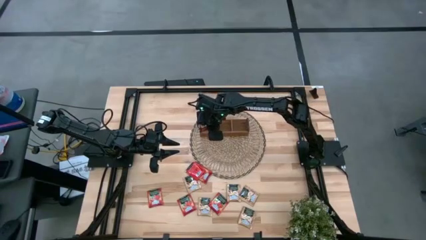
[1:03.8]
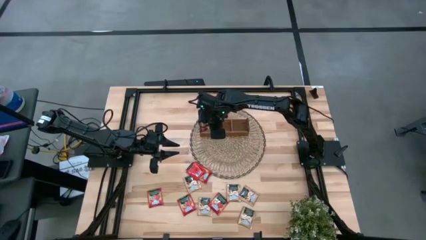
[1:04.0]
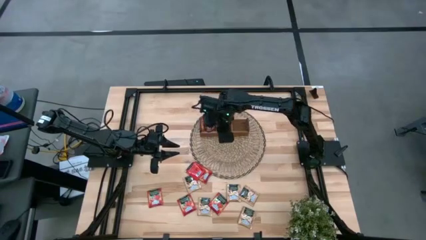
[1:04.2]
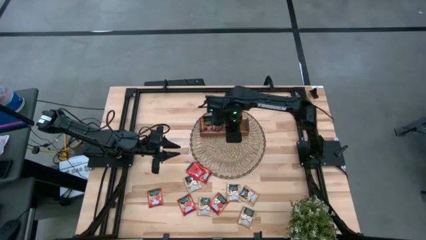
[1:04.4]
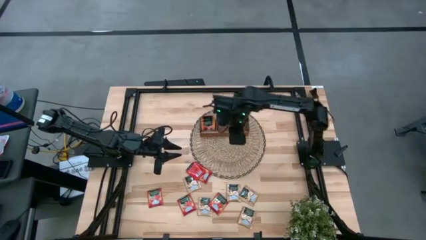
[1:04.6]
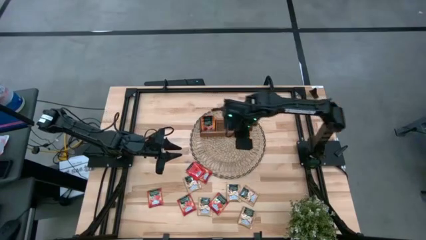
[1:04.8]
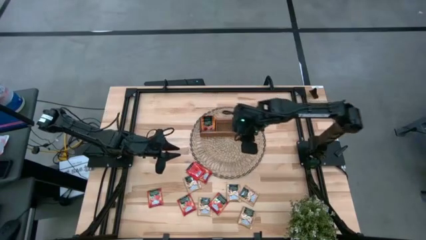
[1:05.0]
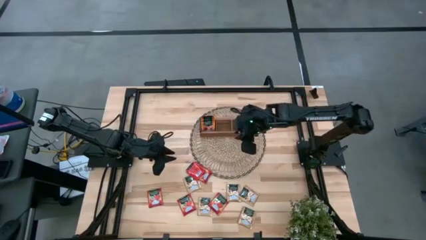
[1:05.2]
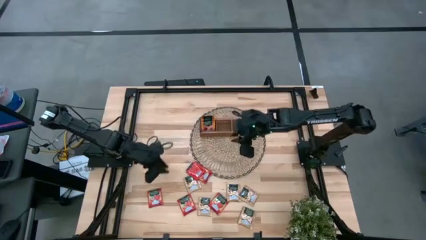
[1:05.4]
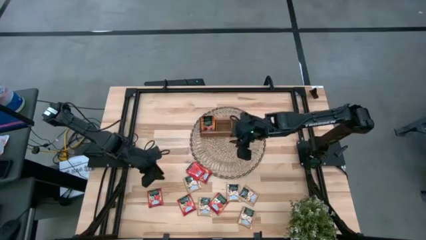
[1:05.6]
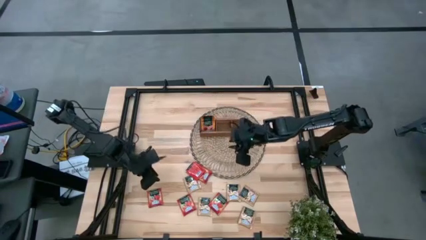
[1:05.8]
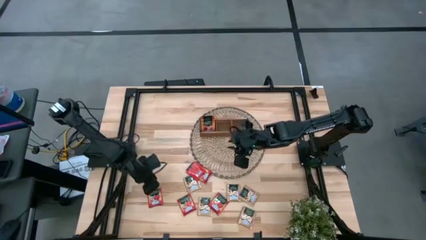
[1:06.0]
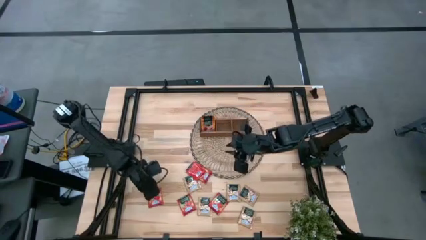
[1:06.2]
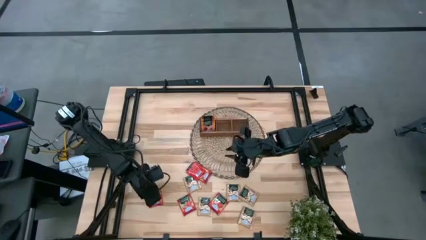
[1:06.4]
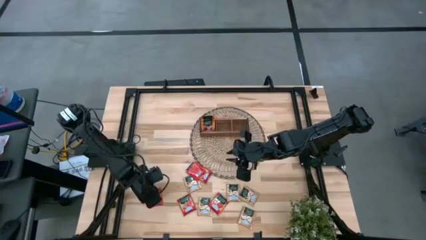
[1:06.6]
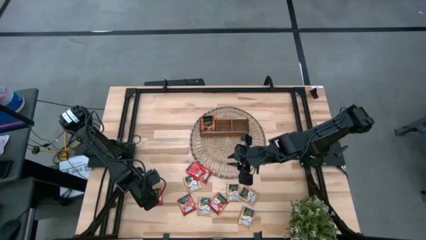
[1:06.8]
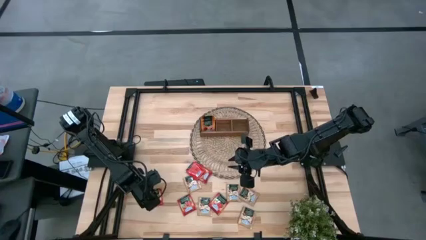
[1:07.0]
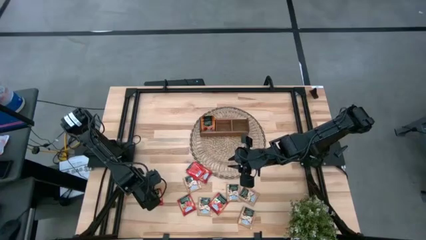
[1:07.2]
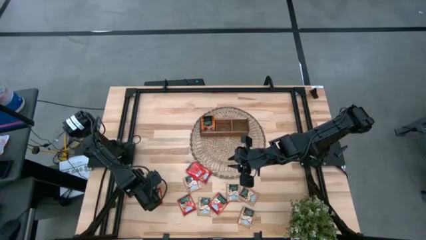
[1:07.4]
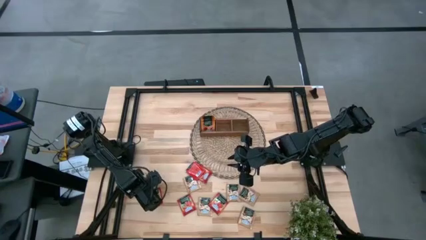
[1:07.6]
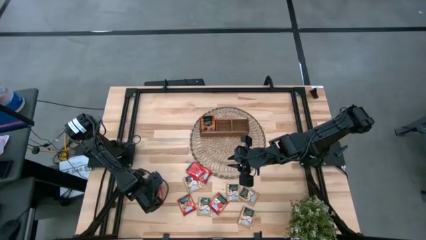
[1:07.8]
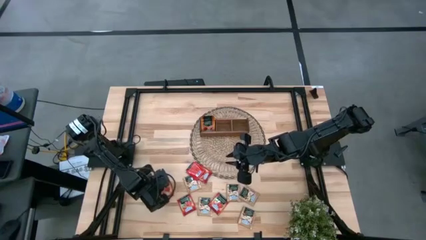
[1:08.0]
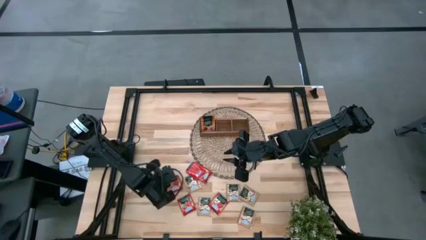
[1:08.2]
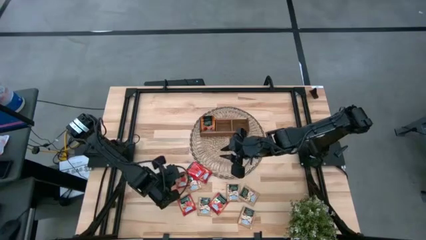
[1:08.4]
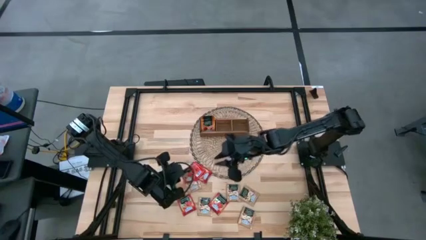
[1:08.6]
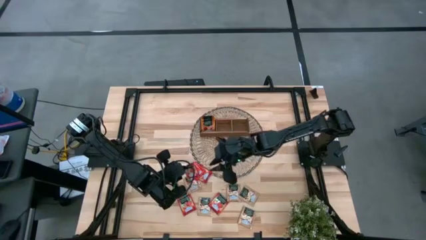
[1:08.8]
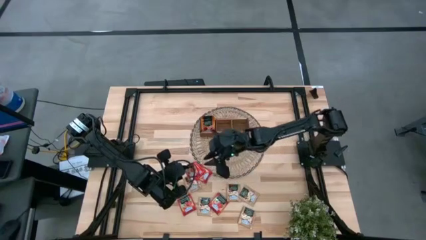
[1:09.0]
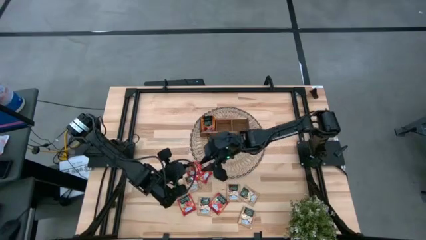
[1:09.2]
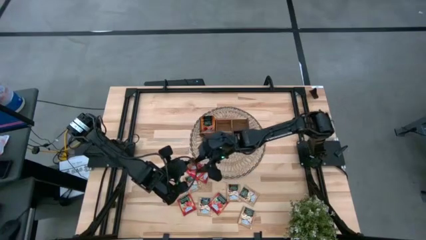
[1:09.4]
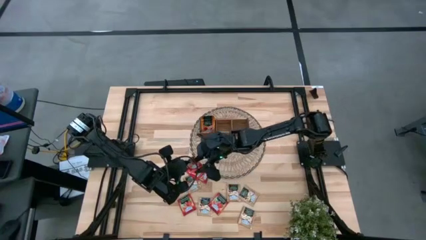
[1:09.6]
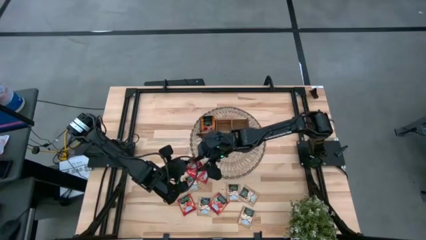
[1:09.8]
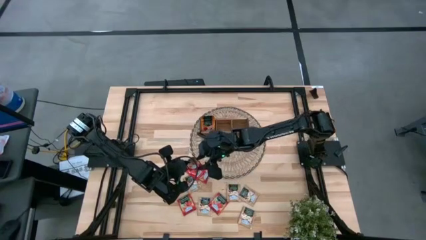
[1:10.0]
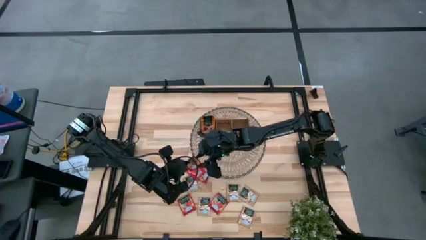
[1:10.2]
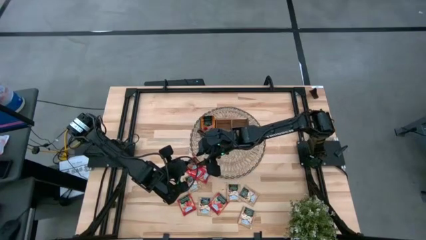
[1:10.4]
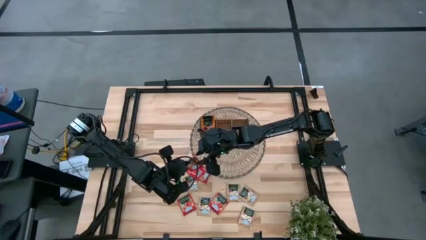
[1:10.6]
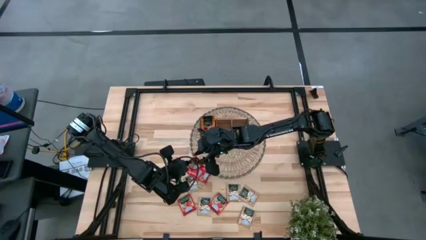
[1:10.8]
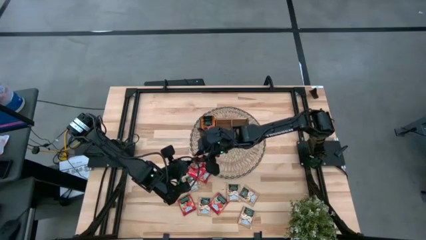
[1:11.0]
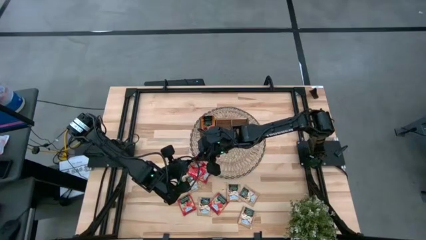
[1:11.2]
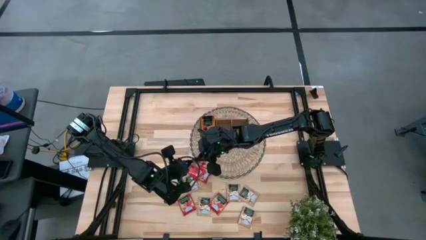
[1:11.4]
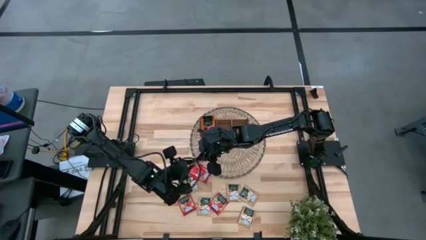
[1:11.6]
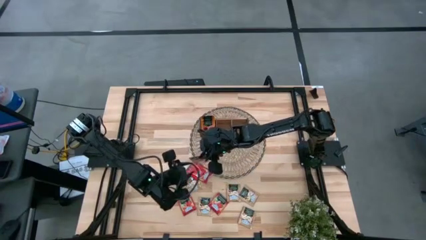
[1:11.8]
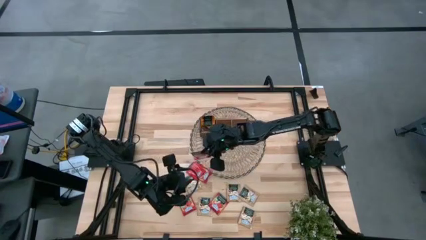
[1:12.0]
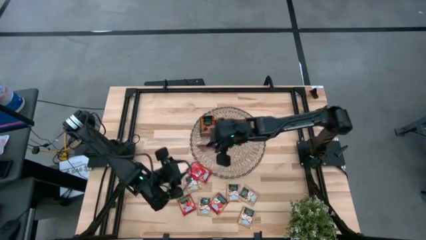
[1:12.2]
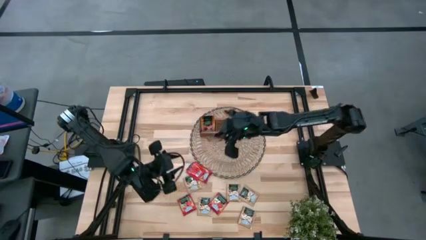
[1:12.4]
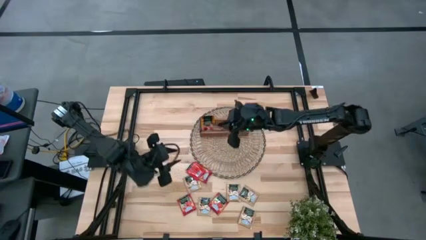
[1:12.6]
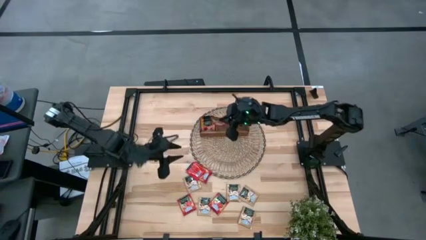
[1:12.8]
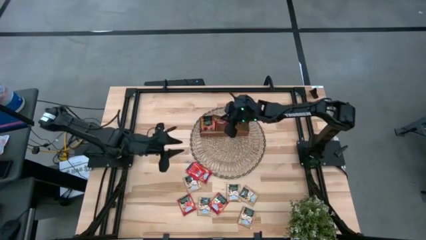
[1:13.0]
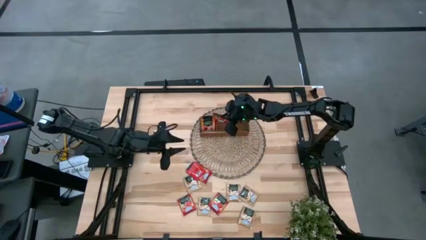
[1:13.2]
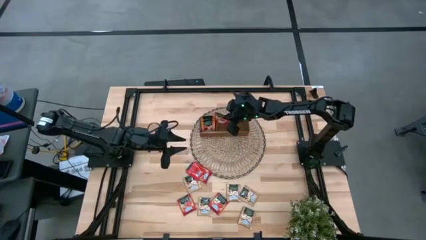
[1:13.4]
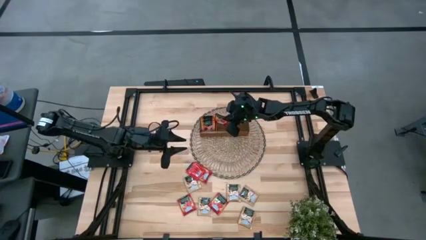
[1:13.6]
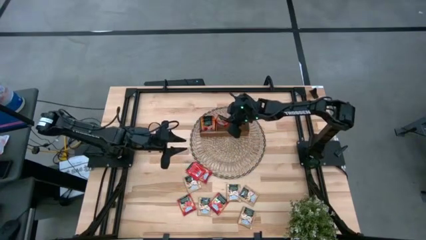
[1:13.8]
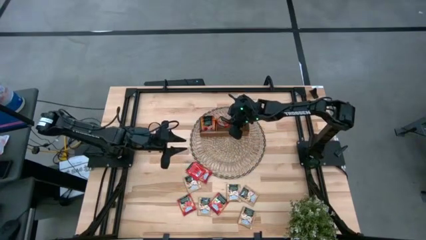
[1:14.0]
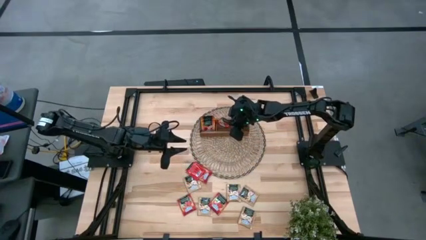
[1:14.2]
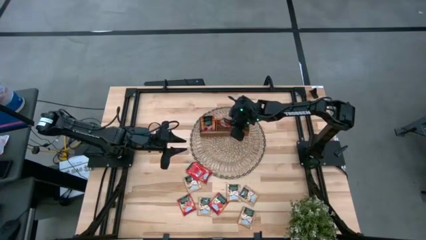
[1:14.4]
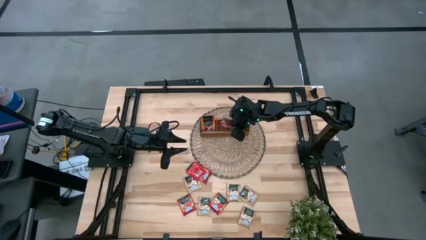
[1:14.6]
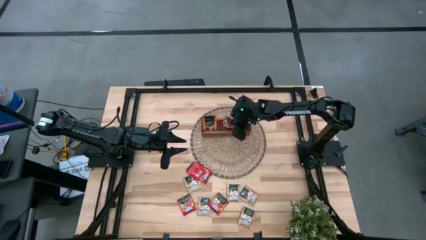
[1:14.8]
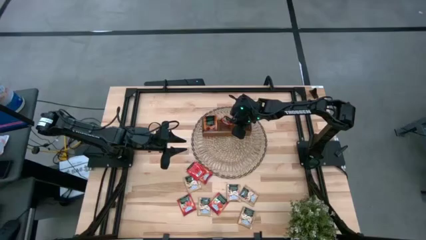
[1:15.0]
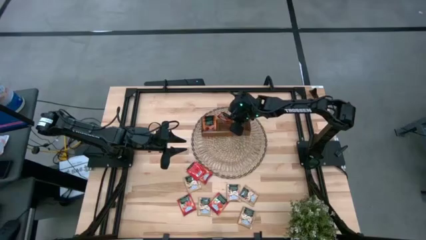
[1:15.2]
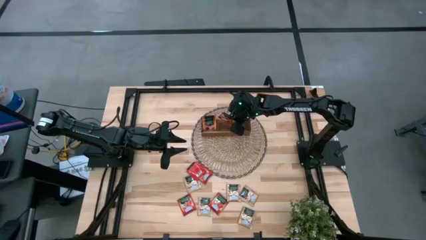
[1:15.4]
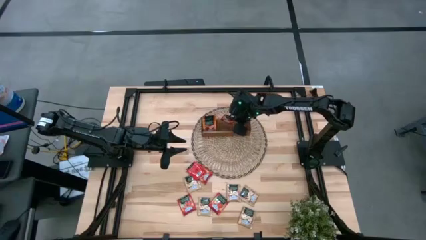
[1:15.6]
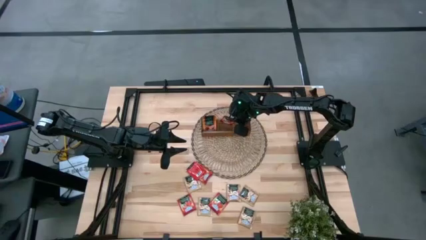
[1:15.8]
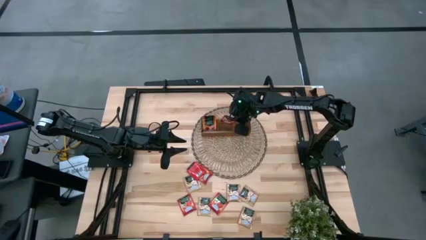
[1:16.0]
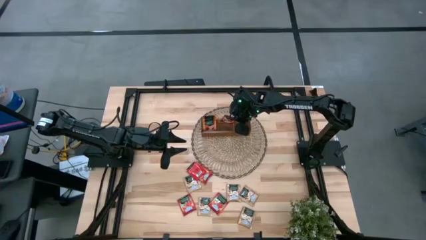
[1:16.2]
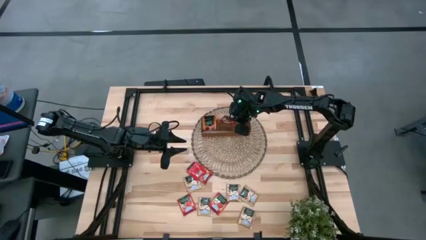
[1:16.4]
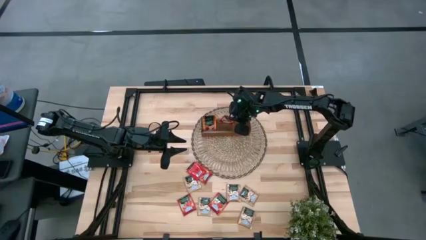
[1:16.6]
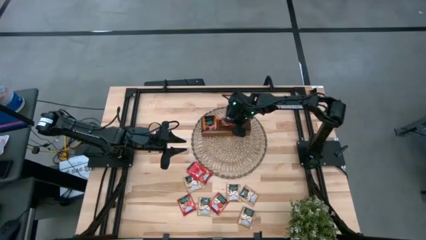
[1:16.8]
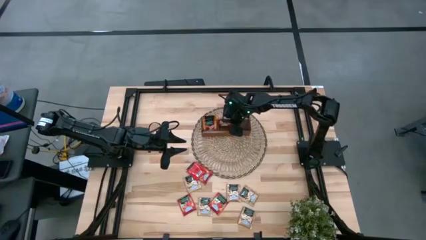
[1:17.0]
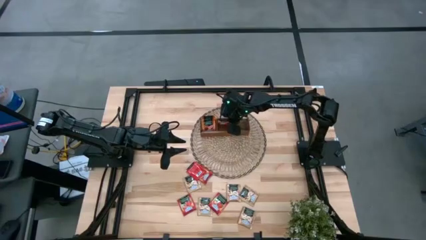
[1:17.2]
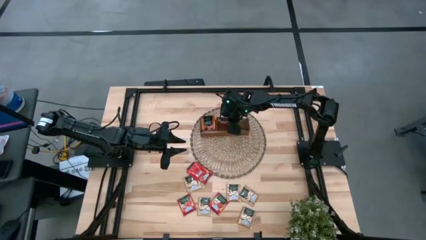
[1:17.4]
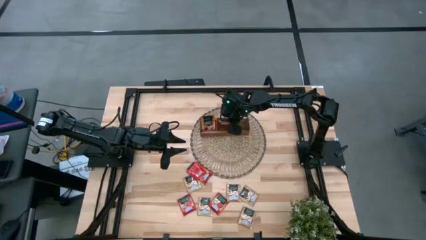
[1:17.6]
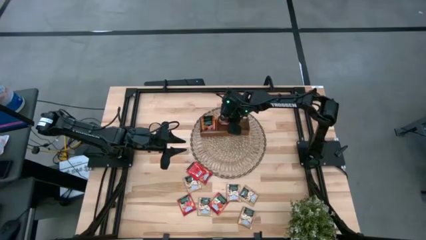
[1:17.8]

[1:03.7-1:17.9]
Task: Pick & Place Tea
Put the red tea bag into the middle section of the wooden organizer

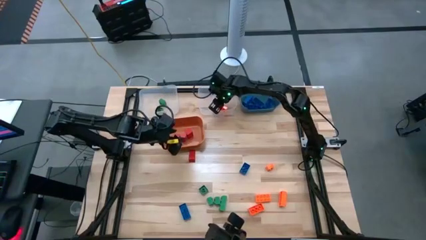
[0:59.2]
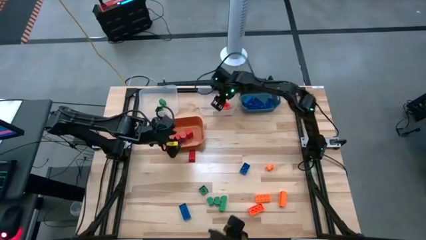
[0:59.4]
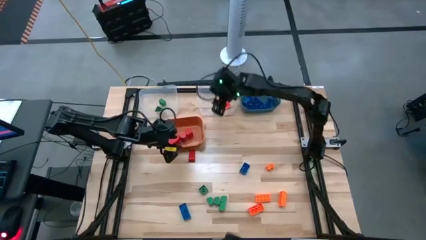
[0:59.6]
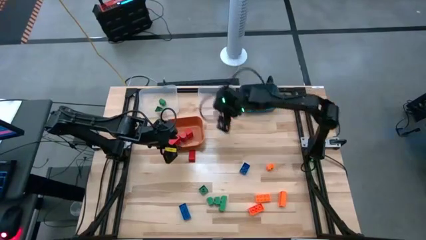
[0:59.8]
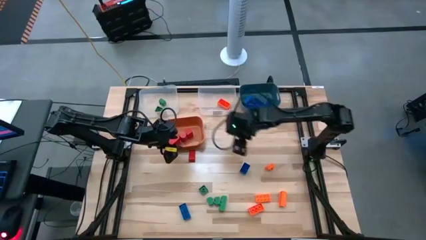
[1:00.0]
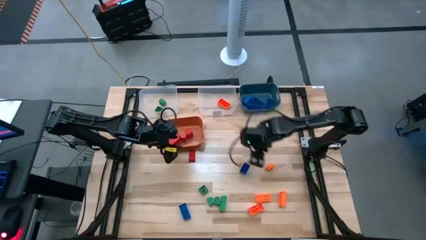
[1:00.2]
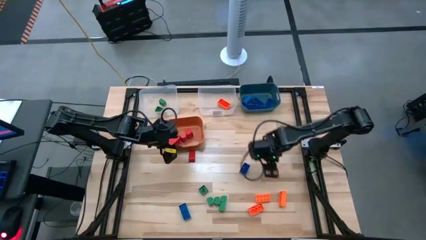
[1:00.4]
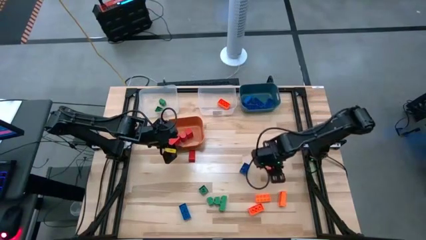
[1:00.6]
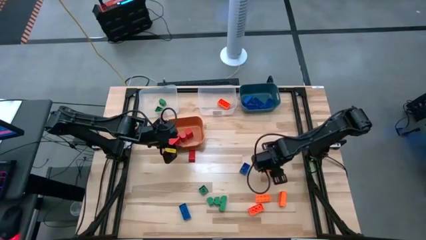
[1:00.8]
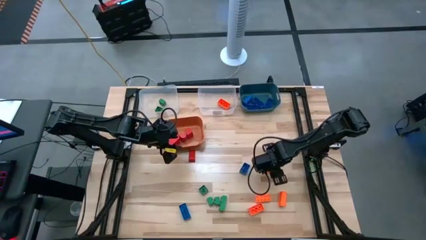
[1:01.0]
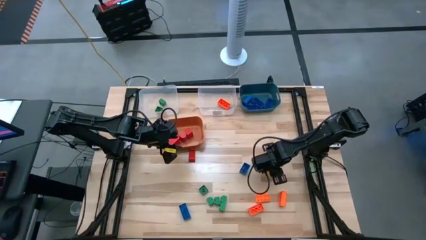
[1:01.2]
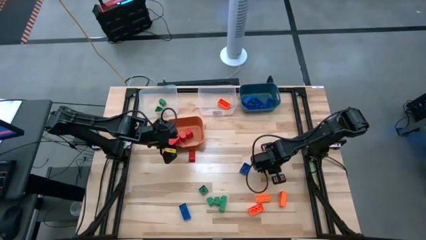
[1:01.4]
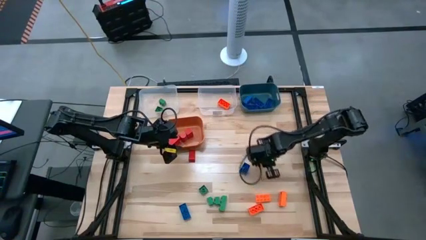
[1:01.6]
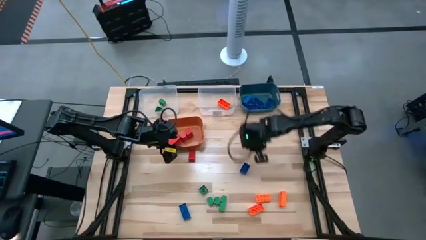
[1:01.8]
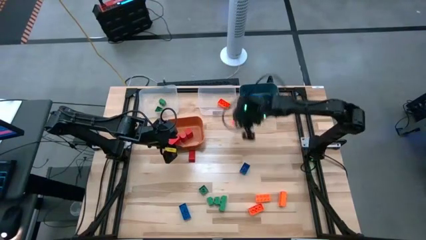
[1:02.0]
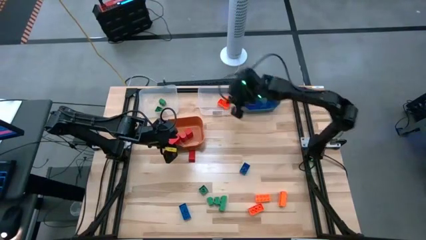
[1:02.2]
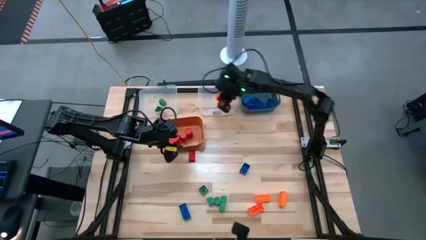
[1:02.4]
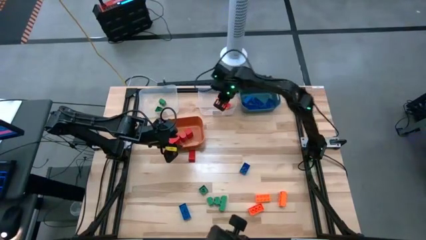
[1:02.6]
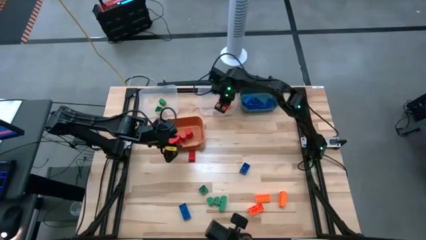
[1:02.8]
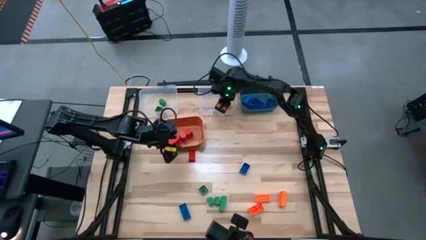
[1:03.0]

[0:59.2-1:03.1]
Task: Sort blocks
Put the orange game piece into the right transparent bin
